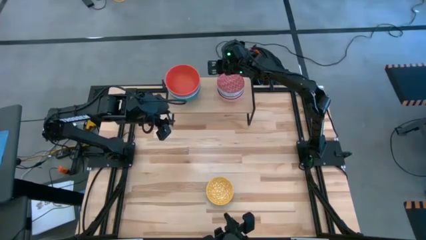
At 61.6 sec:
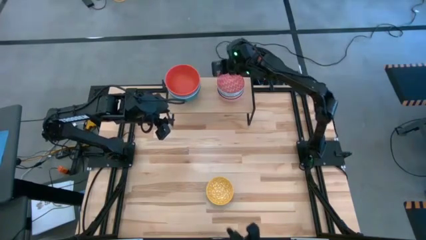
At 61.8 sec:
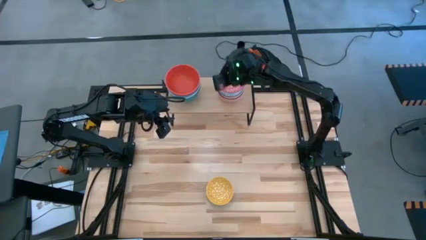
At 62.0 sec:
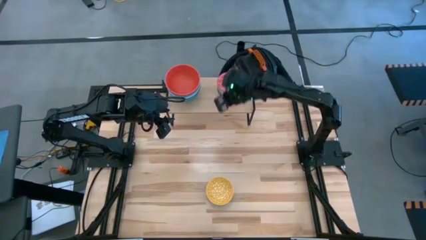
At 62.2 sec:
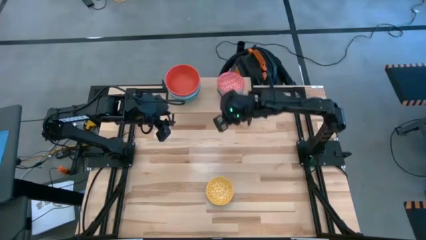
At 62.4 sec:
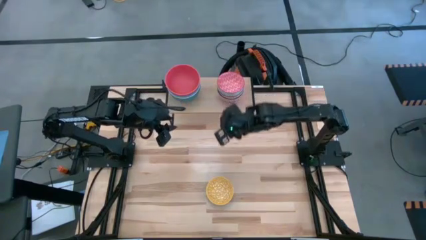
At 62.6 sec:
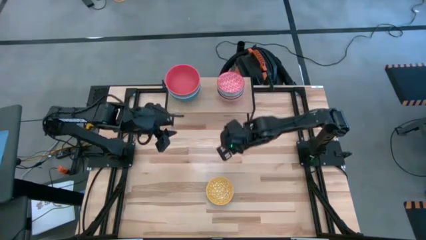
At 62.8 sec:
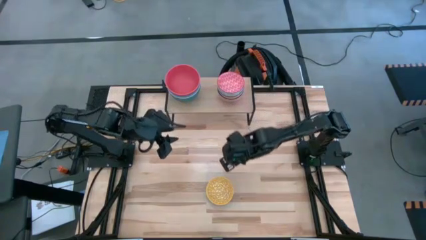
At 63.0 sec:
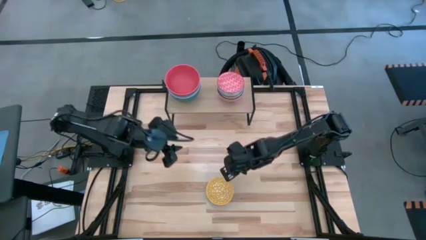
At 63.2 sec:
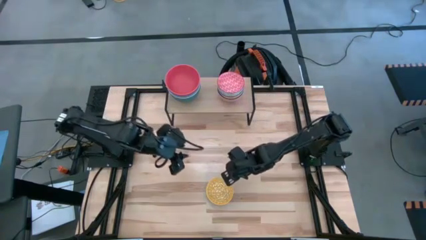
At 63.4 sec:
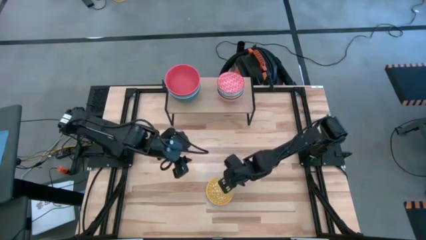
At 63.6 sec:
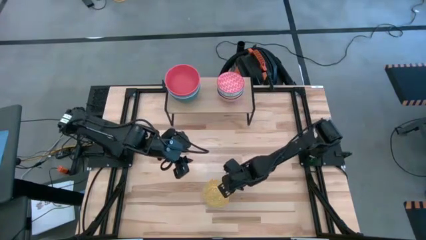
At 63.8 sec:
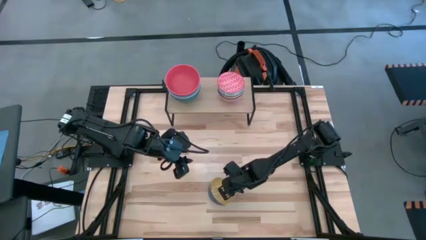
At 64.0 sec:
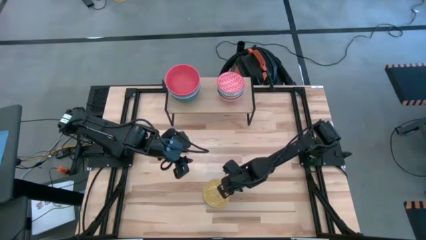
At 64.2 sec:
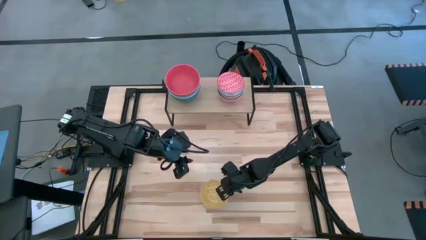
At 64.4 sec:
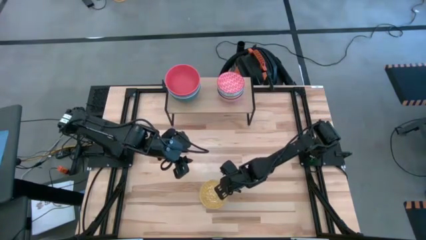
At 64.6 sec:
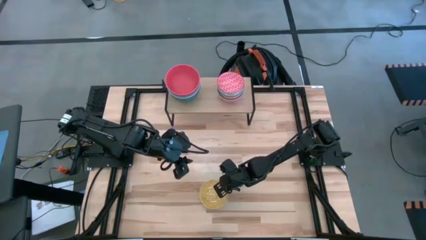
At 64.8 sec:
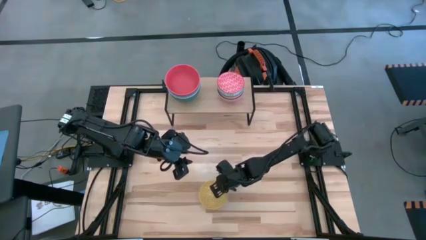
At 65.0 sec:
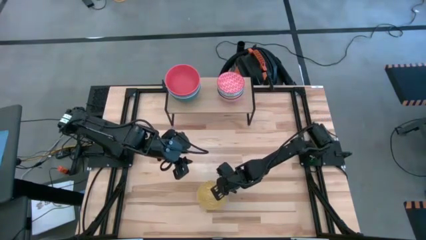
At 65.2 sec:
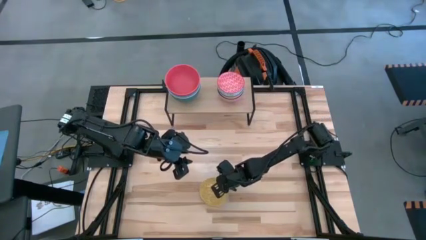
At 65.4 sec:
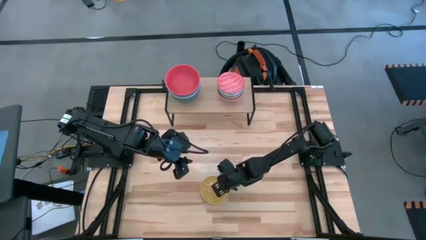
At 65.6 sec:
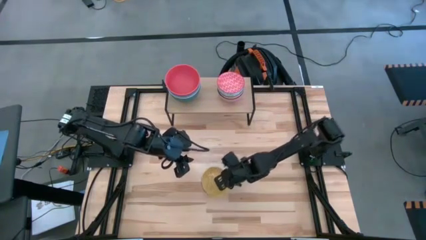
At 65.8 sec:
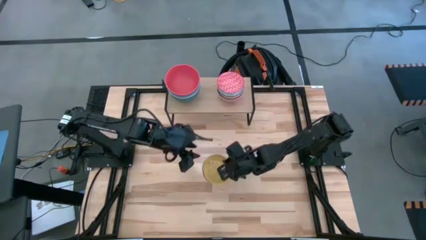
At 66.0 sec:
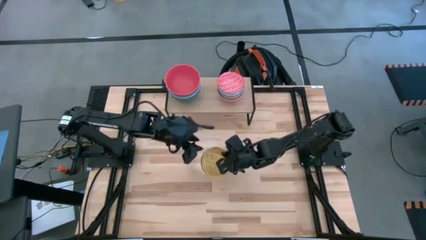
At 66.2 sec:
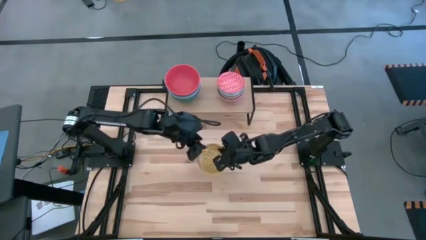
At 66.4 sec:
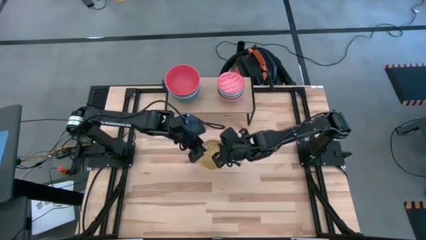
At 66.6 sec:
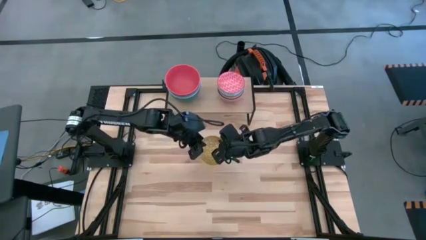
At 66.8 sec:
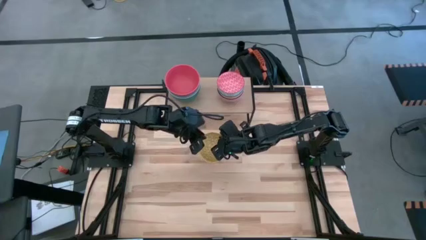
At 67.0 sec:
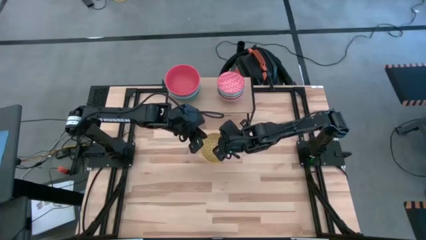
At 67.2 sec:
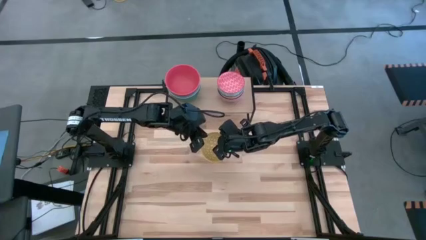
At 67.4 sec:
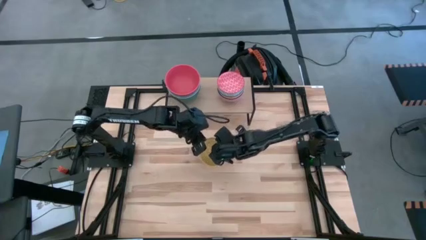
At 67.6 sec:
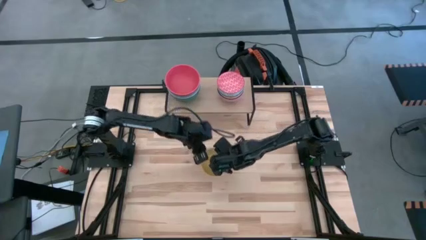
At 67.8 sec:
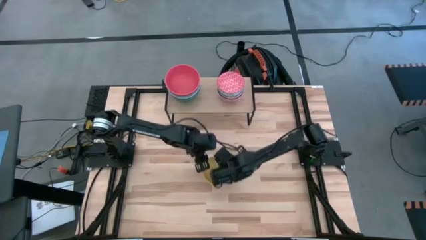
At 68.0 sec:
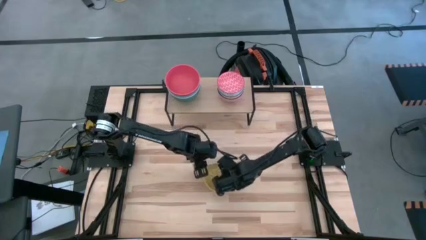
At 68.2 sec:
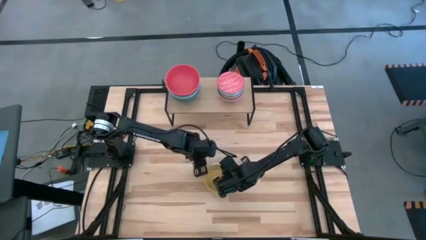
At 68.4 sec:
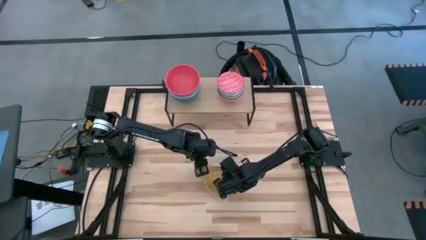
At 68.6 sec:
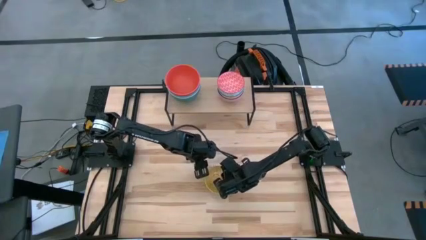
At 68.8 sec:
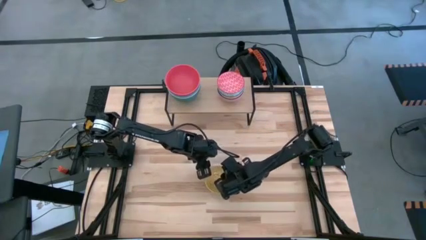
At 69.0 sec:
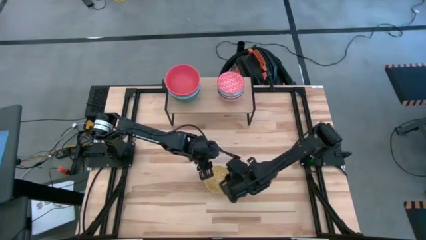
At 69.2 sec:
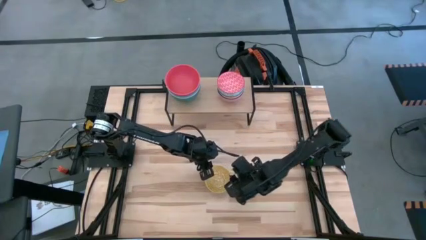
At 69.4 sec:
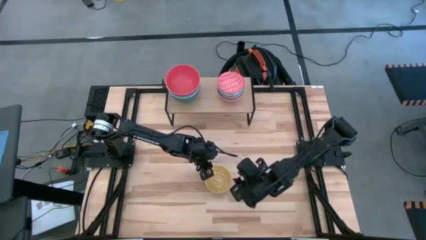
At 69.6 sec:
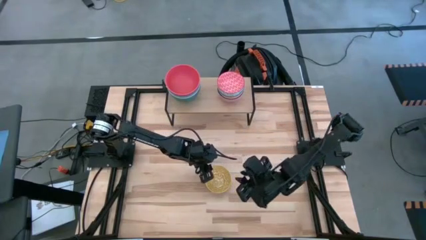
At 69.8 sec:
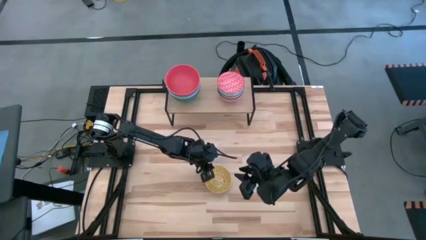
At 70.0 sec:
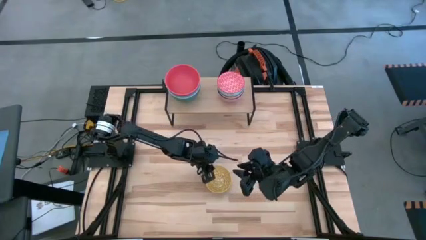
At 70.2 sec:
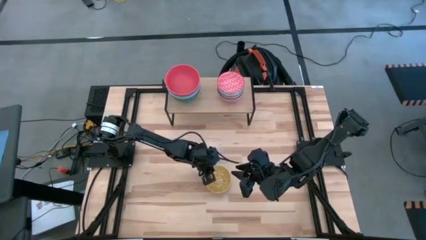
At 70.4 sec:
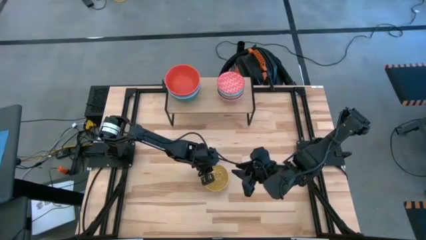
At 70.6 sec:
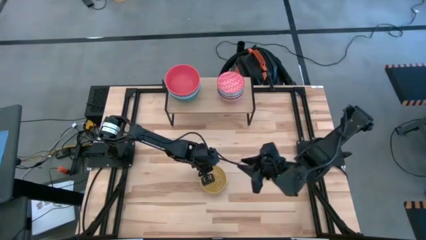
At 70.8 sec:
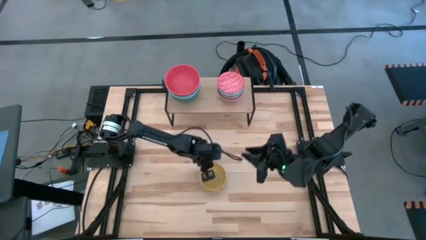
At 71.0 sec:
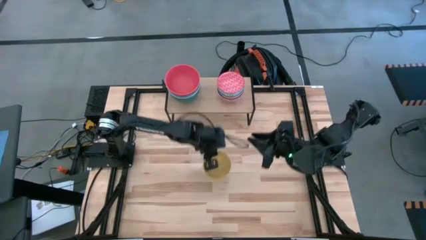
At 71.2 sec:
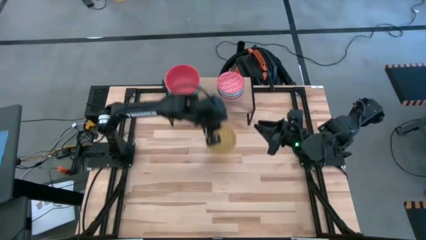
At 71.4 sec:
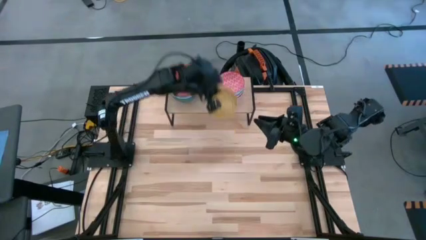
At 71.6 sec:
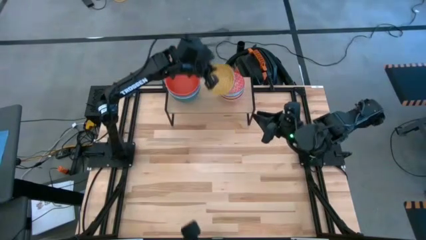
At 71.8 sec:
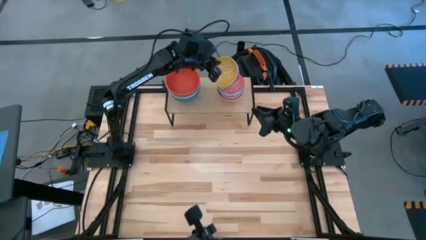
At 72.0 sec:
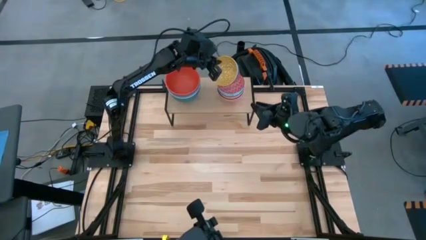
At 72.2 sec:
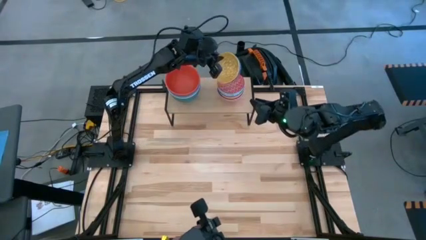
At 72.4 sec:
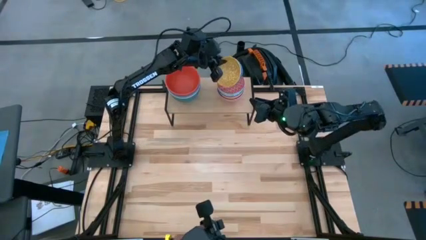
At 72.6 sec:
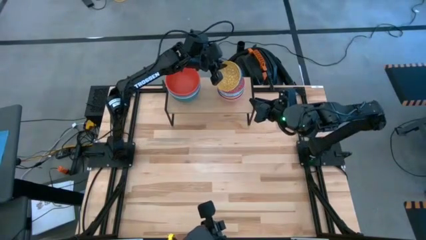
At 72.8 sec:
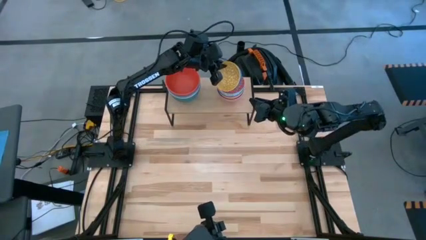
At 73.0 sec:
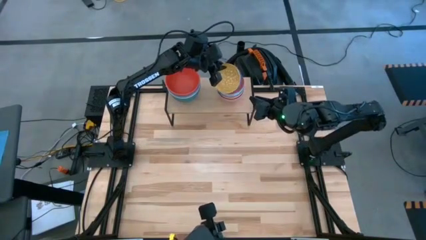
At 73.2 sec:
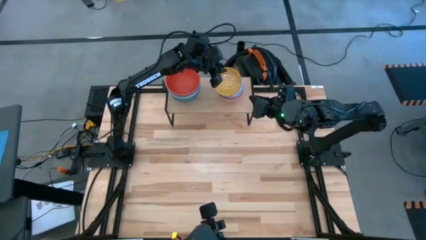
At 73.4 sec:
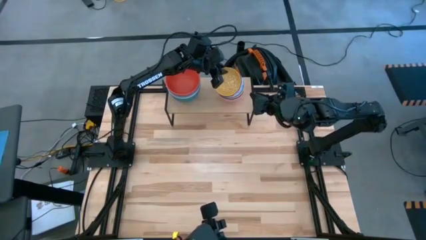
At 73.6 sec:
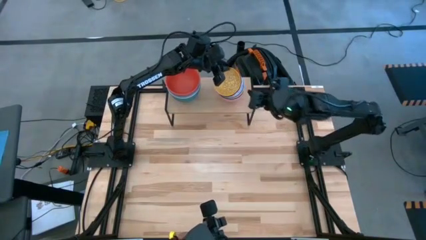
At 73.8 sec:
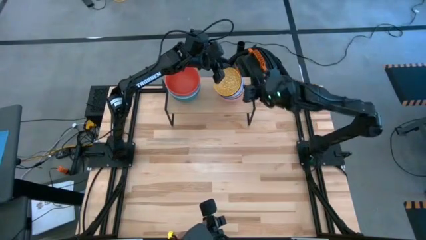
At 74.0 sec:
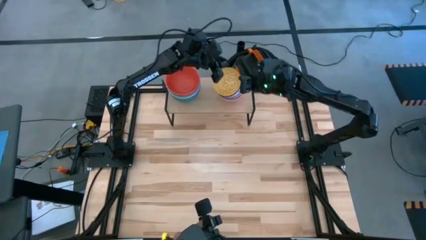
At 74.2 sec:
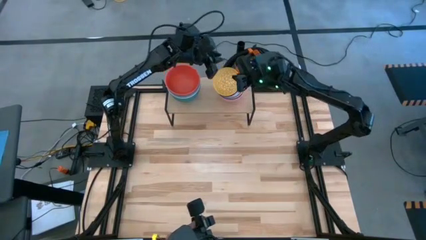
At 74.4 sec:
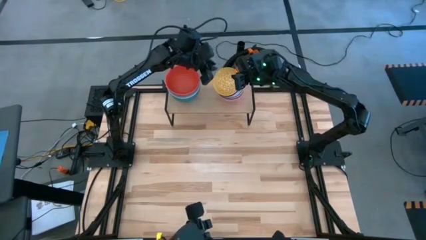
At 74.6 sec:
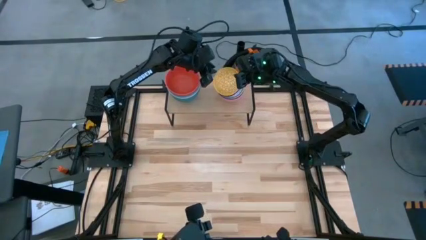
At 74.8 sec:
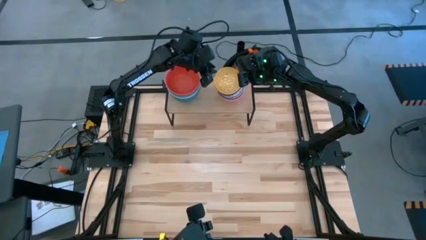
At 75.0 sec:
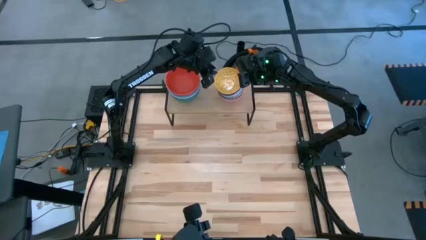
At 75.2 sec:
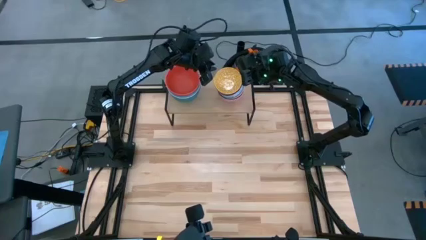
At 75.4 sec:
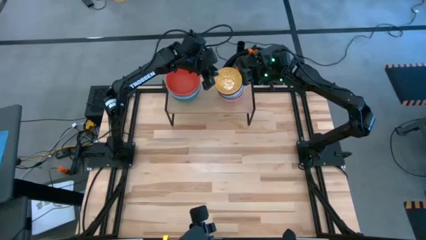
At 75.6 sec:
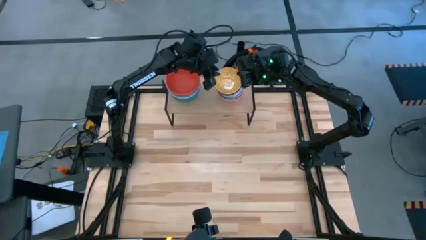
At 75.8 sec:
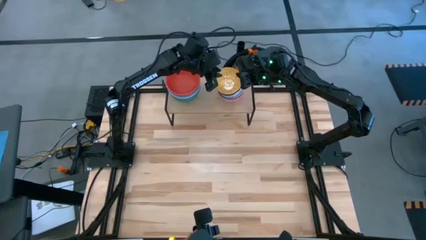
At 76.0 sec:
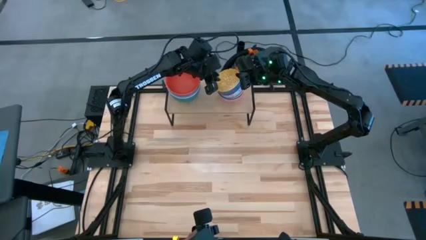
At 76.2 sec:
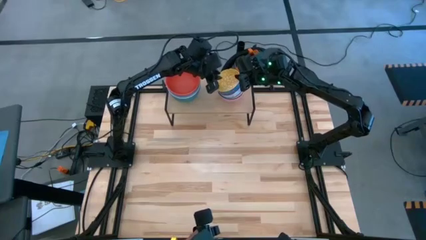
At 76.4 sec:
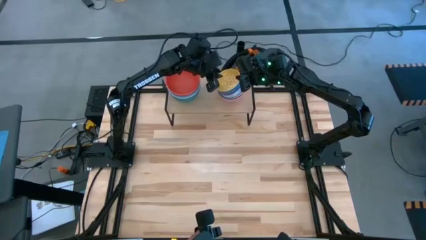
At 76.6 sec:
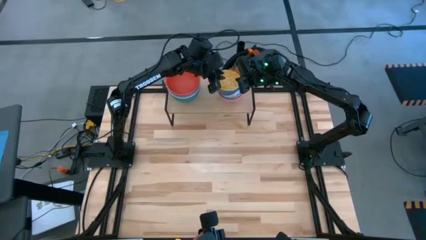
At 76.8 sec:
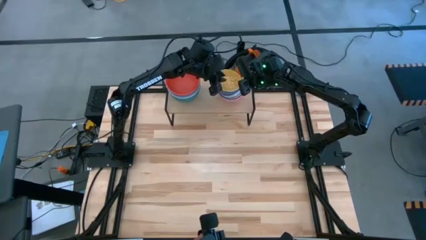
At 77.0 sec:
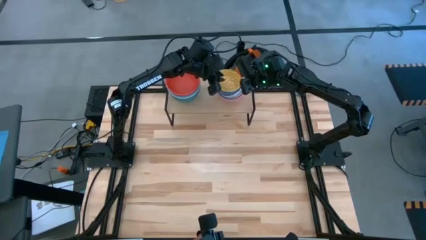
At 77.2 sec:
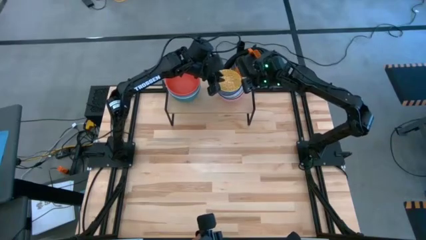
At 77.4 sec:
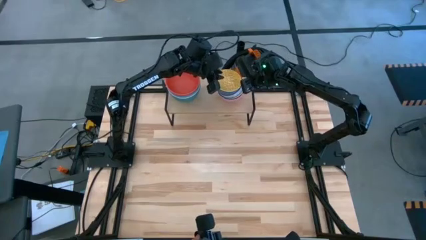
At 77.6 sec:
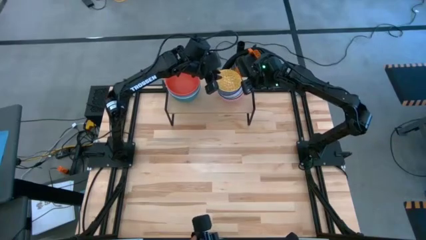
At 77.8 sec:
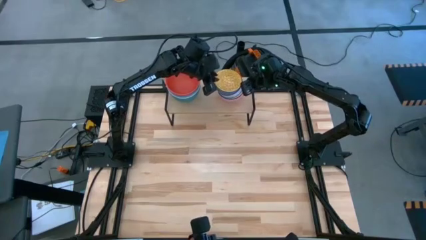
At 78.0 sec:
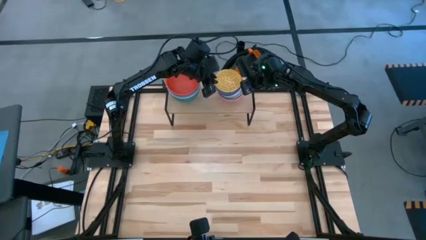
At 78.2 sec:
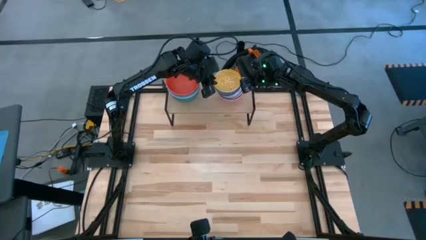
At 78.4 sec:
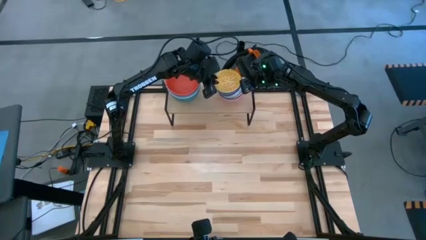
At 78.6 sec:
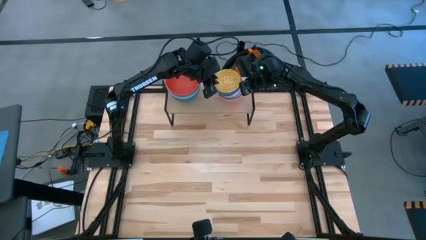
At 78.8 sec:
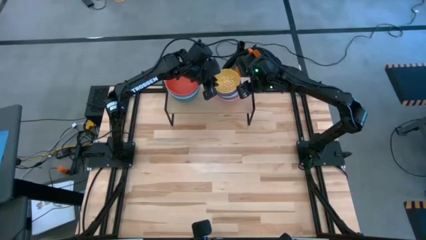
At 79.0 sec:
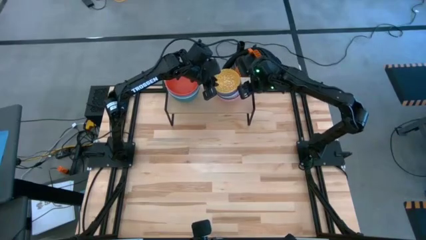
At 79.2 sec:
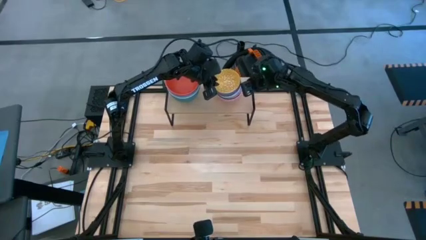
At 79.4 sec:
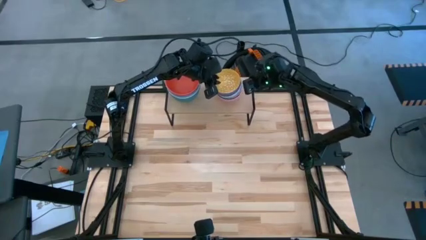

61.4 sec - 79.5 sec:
Task: Place and stack bowls onto a shelf
Stack the yellow bowl into the red printed bowl
